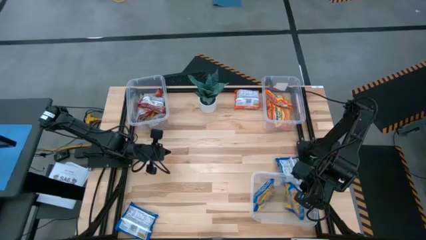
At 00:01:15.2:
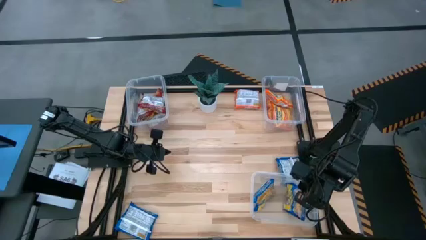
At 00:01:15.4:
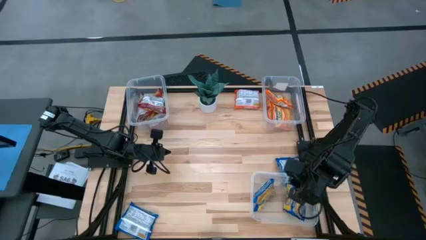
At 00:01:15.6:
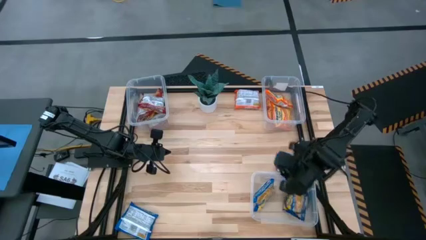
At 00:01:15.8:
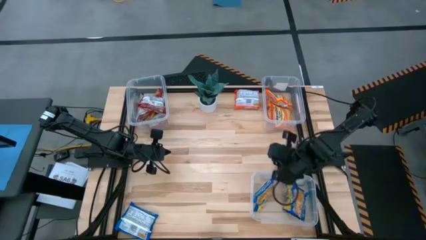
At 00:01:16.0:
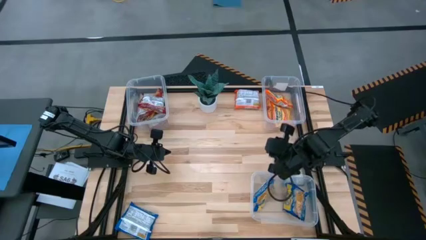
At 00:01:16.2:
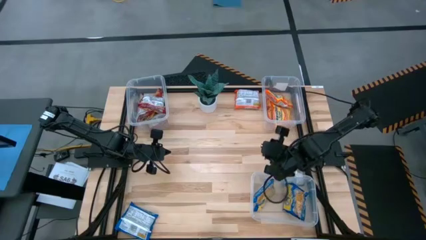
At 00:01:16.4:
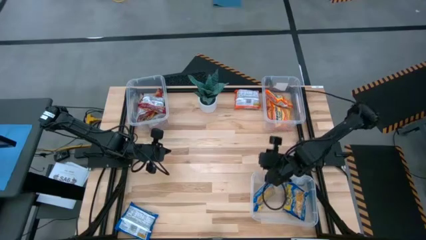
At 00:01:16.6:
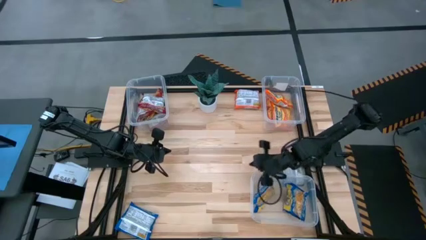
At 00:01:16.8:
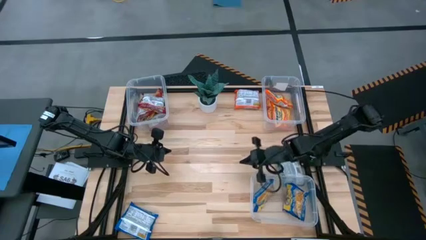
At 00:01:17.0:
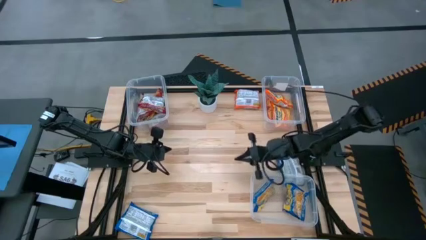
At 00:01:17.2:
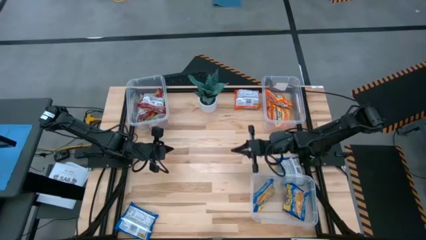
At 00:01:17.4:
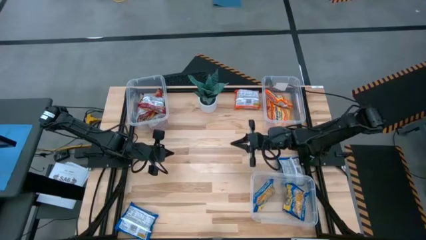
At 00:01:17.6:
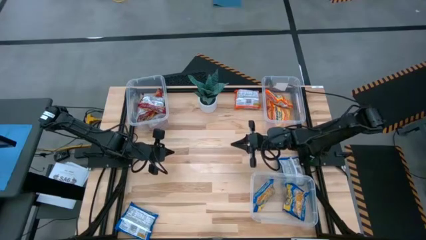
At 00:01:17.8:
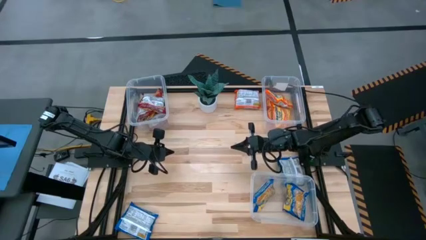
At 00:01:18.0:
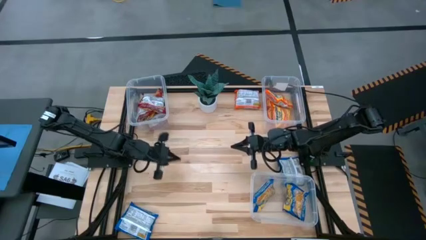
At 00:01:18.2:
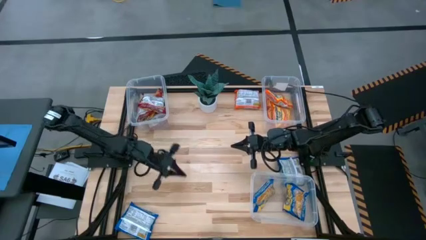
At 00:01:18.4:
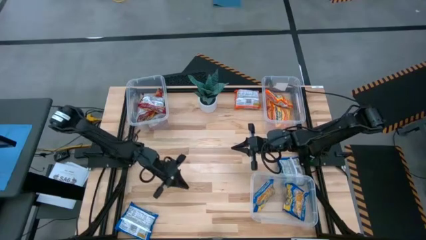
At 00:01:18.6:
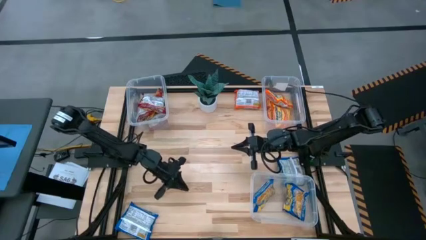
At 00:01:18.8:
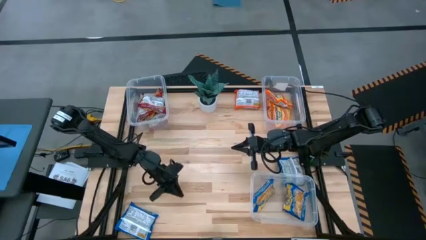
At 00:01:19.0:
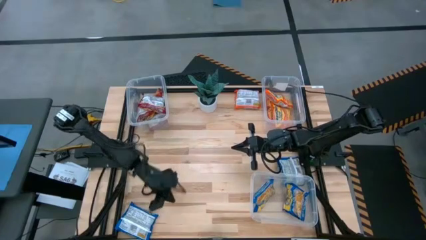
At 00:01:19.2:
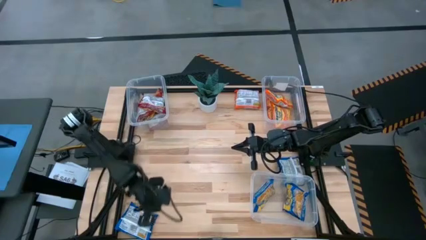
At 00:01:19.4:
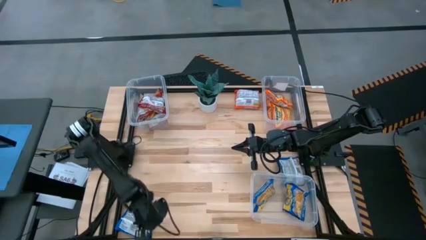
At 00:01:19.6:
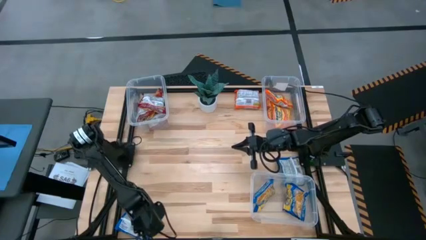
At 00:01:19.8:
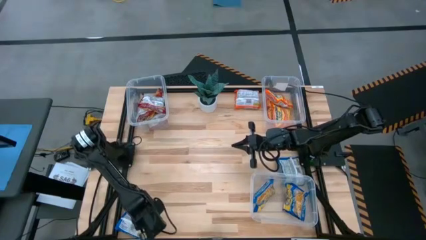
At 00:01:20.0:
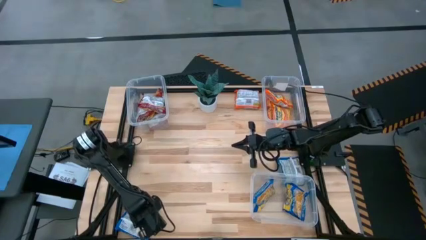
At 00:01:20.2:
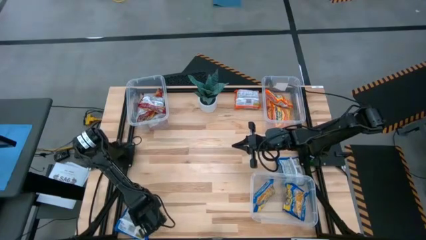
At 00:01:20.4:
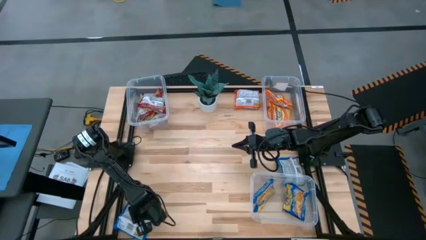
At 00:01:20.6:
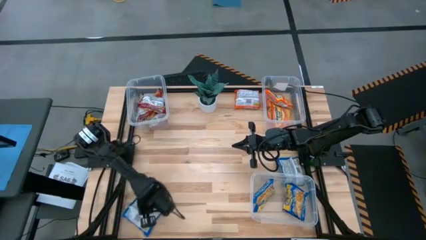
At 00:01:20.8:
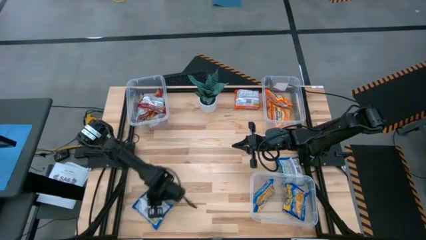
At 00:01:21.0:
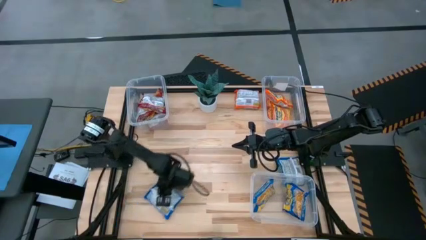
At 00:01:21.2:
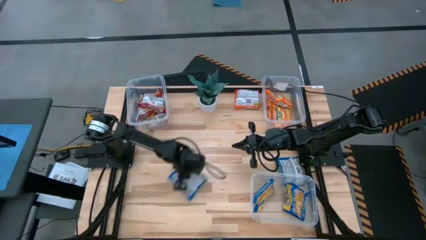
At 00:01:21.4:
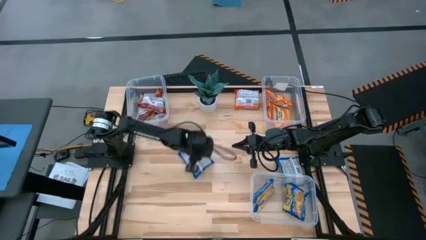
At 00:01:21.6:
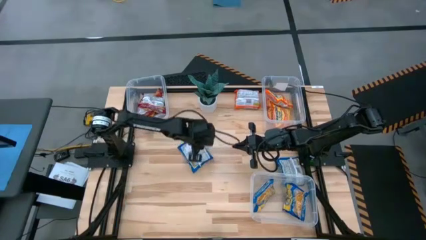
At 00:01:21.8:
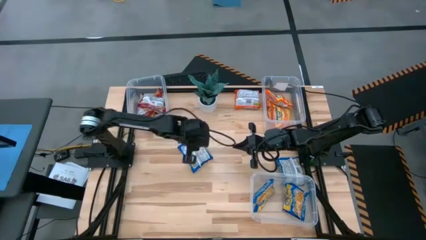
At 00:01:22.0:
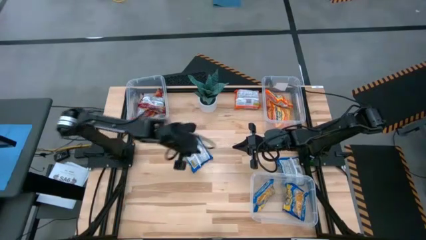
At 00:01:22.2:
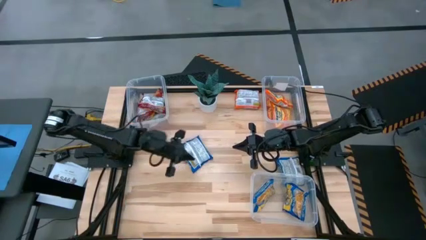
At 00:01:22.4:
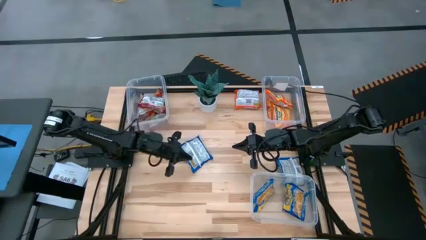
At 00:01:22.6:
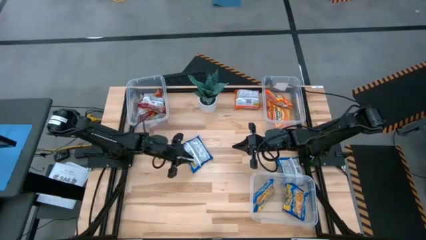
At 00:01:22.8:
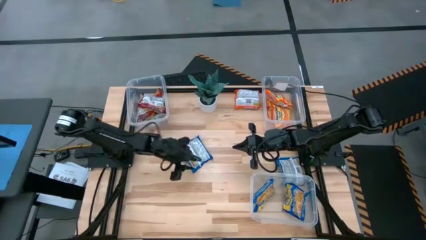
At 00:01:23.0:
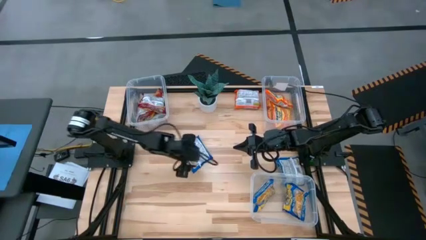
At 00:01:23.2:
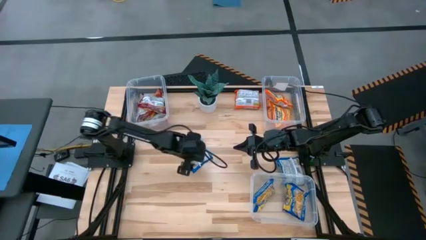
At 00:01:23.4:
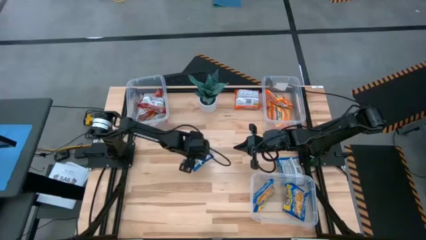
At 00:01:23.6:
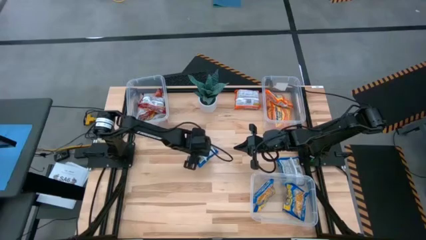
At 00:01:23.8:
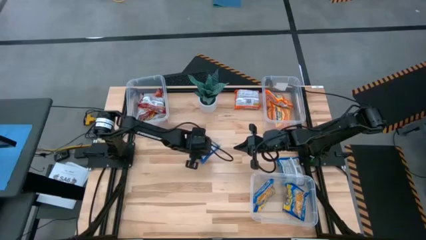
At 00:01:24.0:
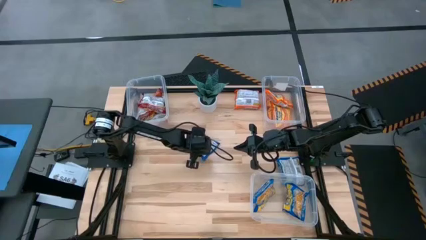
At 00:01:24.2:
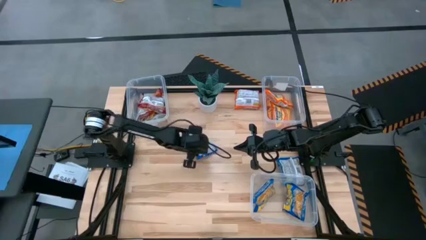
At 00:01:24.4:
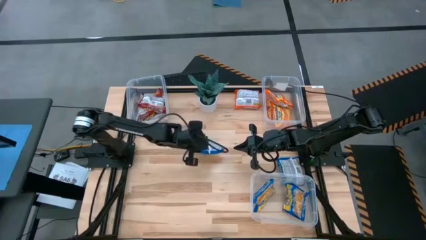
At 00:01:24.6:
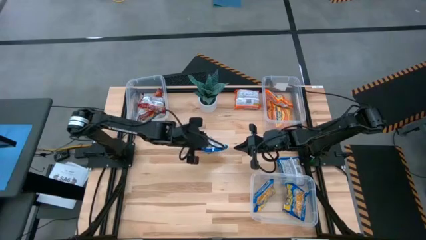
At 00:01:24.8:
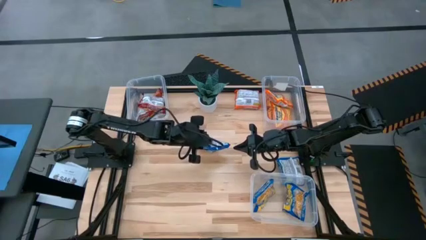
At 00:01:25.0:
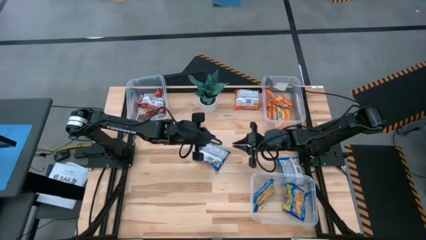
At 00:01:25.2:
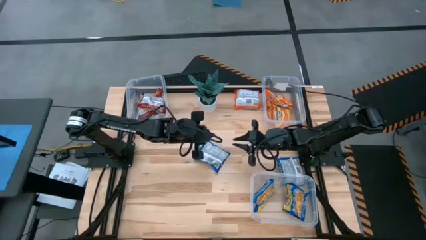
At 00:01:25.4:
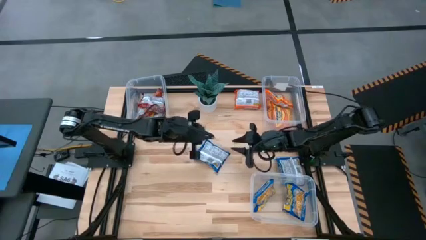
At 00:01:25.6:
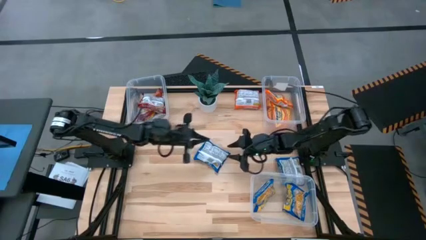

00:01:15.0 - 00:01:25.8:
Task: Sort Maruchan noodles
Put the blue noodle pack in the top right transparent bin

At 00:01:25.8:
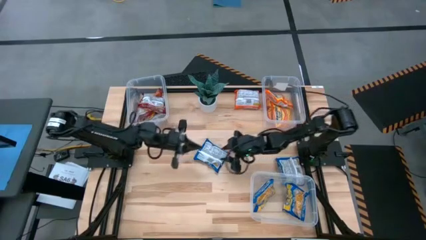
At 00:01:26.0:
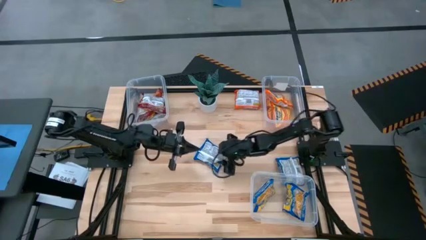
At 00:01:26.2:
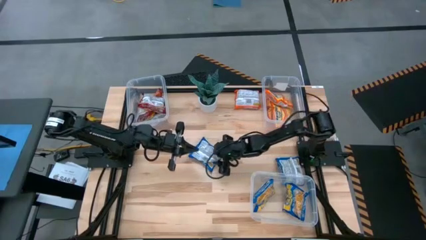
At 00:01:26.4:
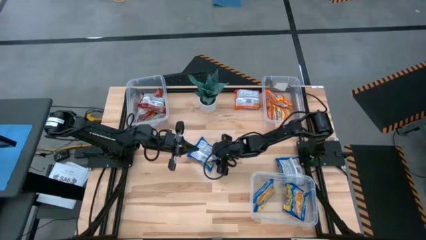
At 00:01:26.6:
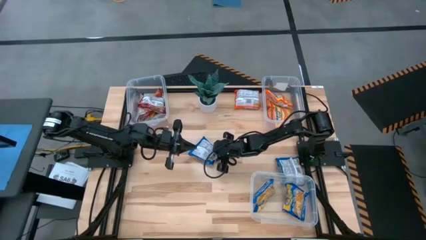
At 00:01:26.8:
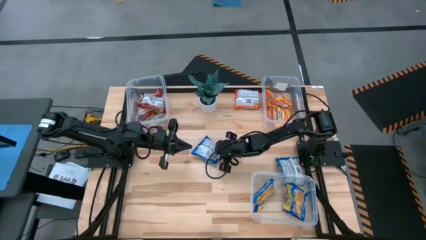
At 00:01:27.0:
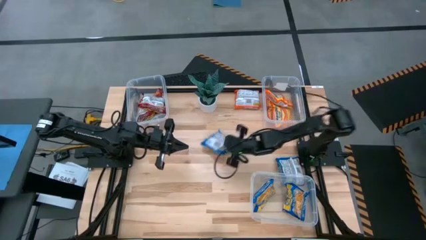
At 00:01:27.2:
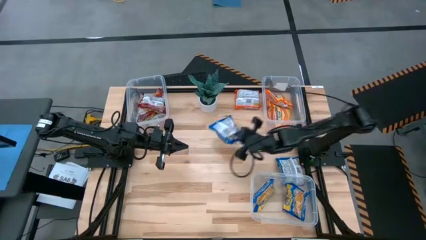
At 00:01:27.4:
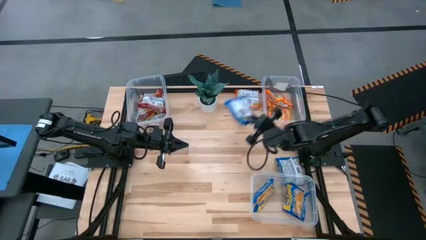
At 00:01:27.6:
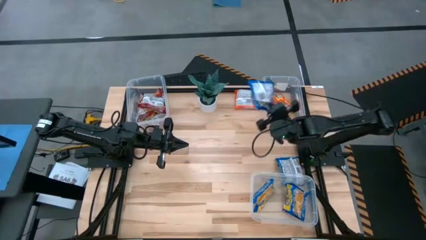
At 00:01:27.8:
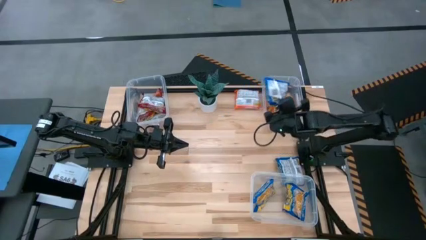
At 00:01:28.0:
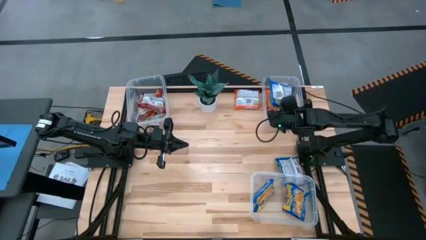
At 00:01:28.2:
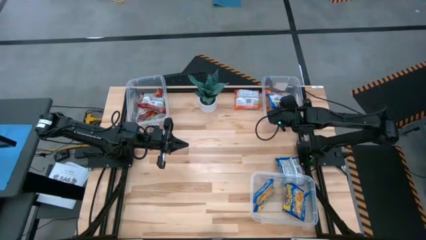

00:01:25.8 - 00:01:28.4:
Put the blue noodle pack in the top right transparent bin
